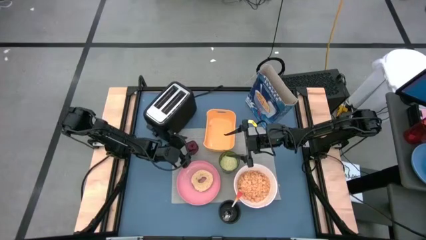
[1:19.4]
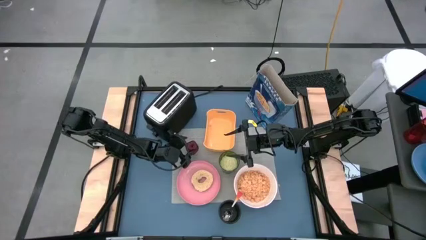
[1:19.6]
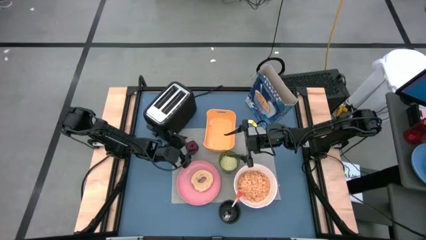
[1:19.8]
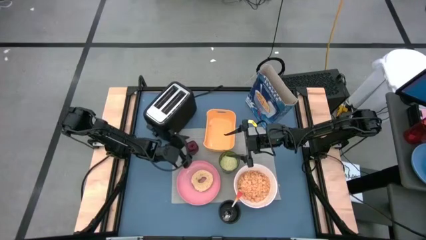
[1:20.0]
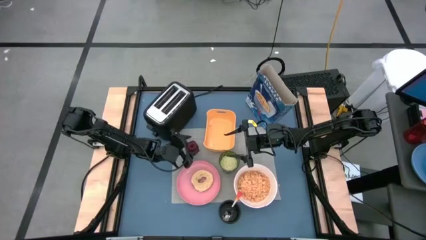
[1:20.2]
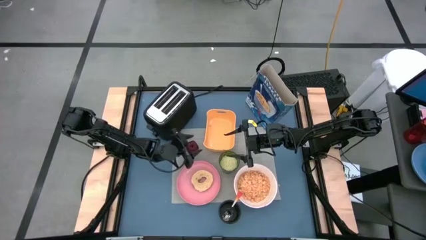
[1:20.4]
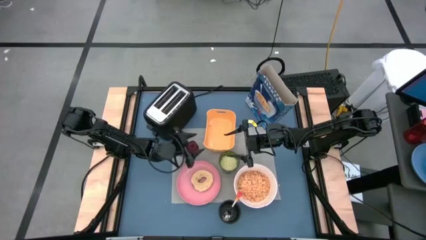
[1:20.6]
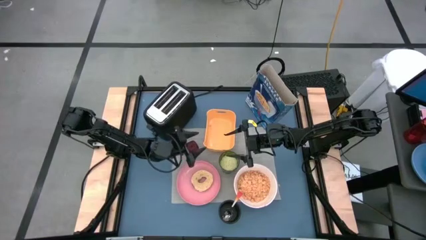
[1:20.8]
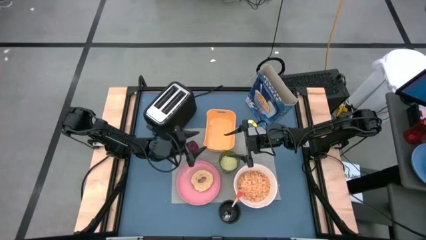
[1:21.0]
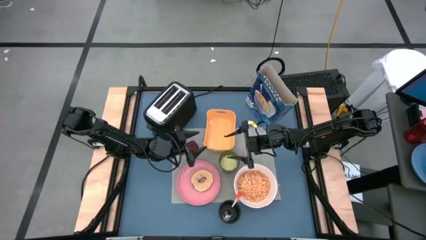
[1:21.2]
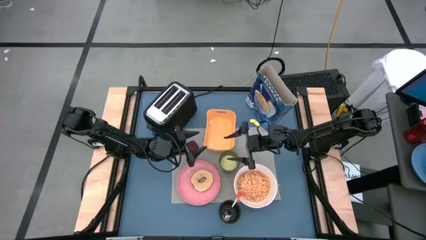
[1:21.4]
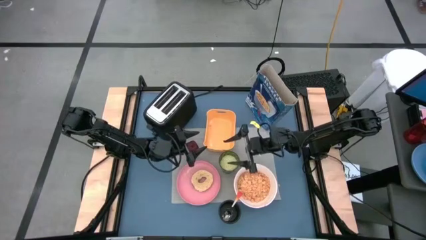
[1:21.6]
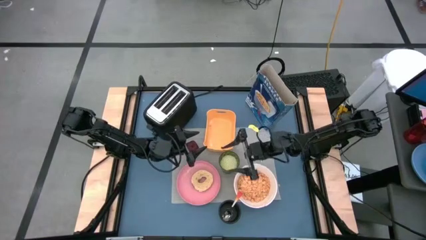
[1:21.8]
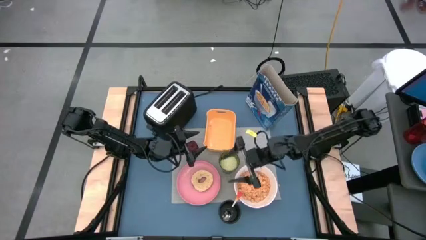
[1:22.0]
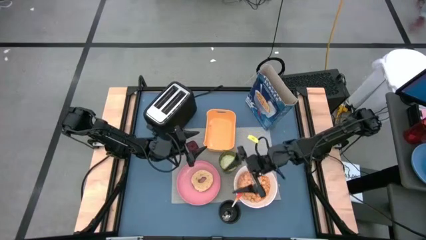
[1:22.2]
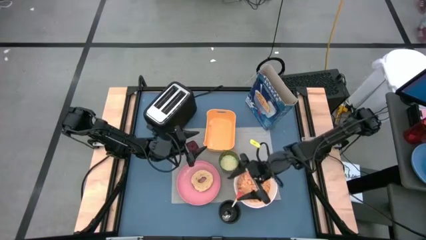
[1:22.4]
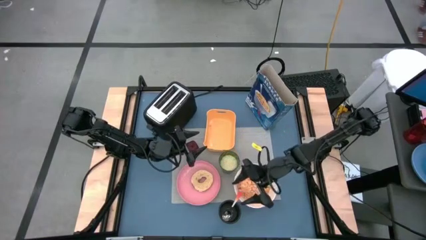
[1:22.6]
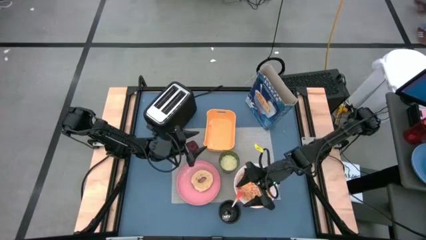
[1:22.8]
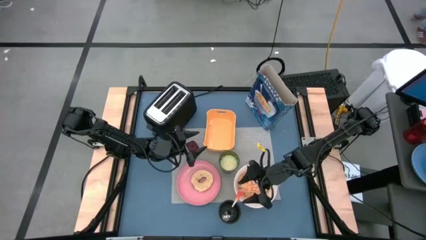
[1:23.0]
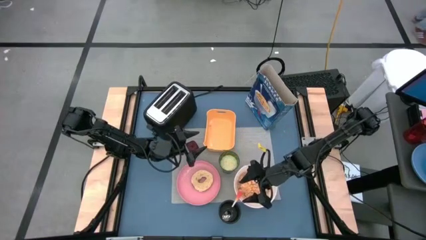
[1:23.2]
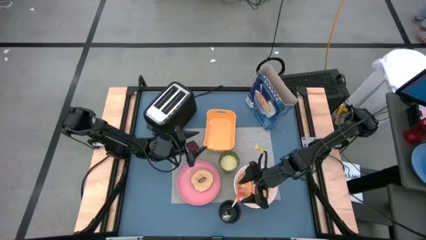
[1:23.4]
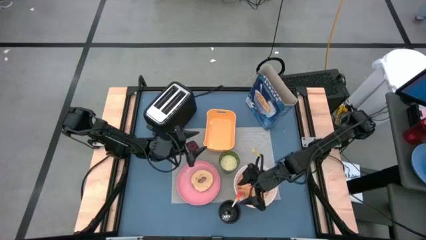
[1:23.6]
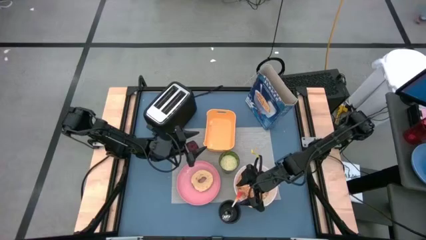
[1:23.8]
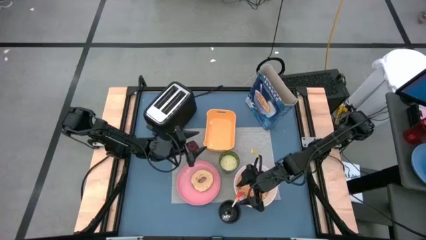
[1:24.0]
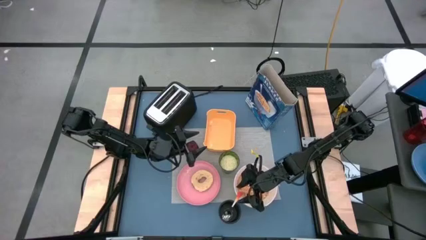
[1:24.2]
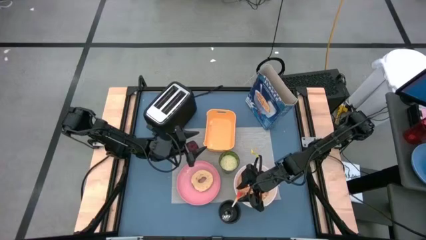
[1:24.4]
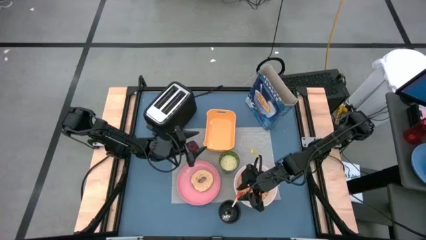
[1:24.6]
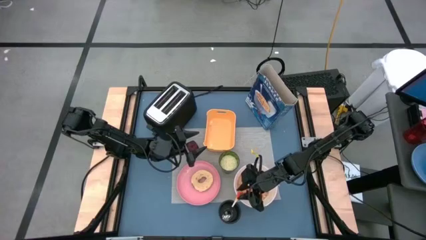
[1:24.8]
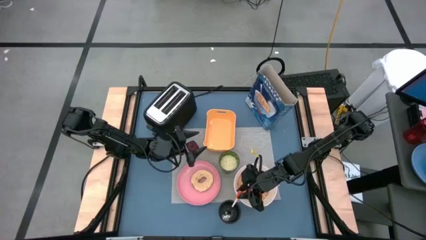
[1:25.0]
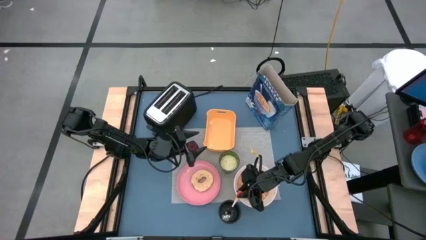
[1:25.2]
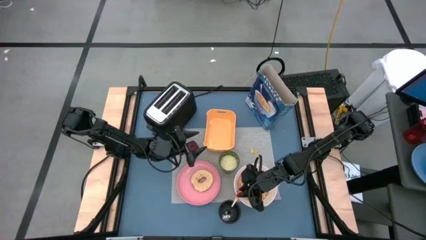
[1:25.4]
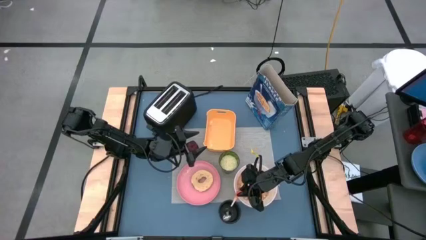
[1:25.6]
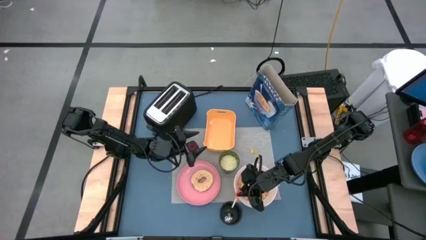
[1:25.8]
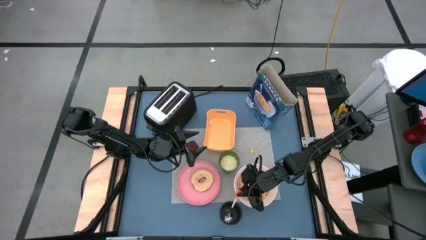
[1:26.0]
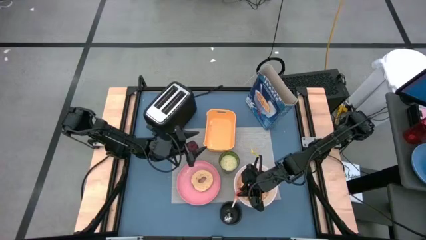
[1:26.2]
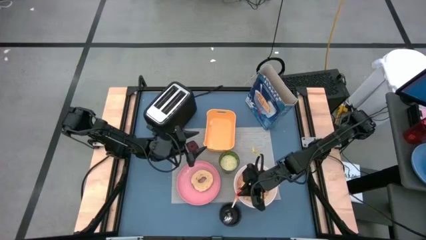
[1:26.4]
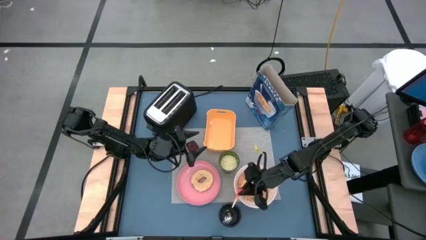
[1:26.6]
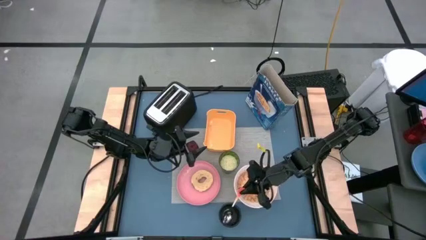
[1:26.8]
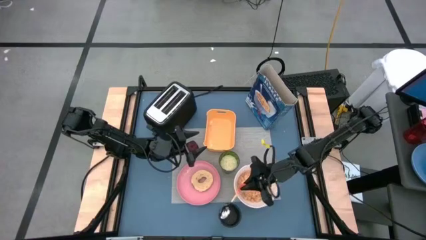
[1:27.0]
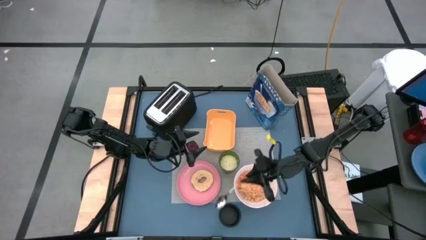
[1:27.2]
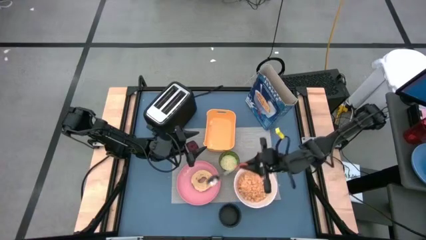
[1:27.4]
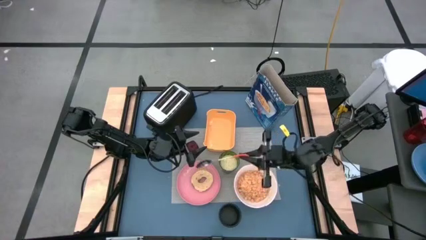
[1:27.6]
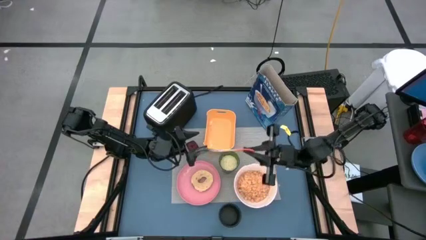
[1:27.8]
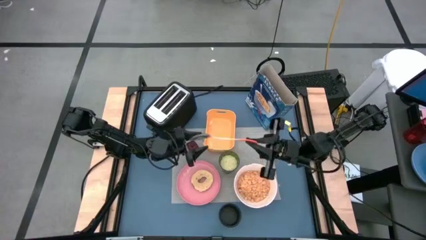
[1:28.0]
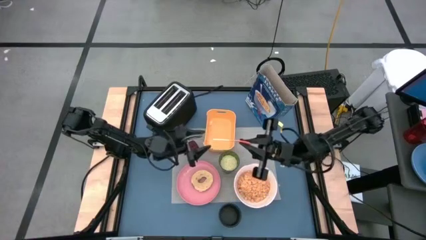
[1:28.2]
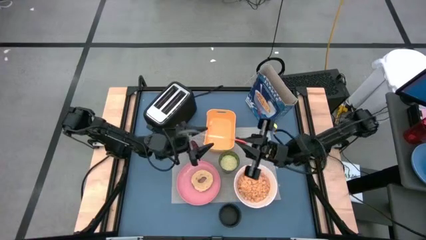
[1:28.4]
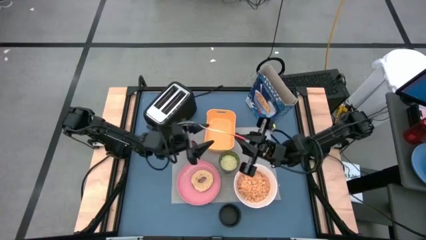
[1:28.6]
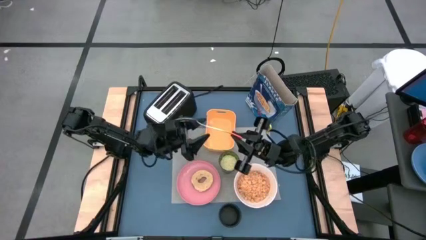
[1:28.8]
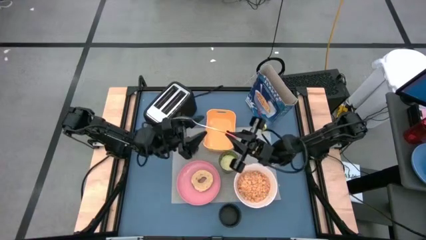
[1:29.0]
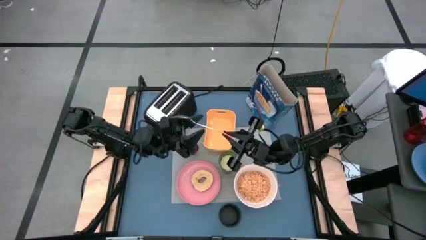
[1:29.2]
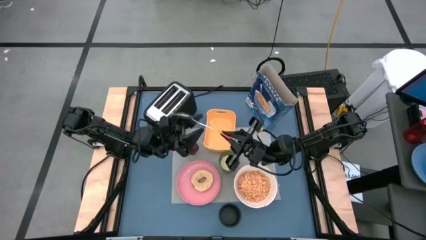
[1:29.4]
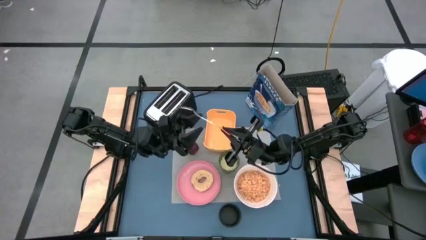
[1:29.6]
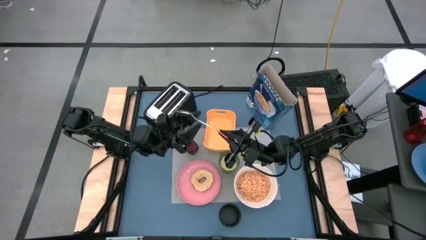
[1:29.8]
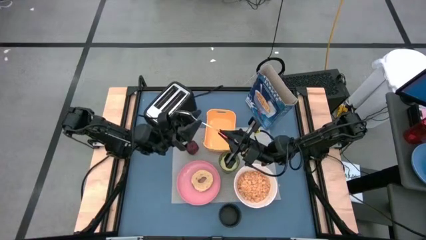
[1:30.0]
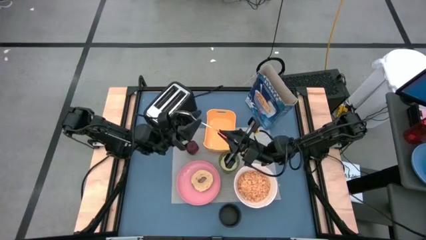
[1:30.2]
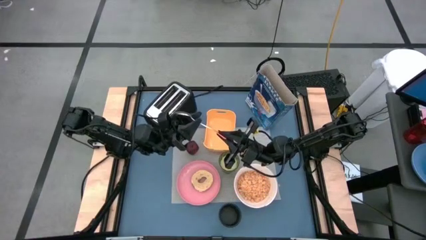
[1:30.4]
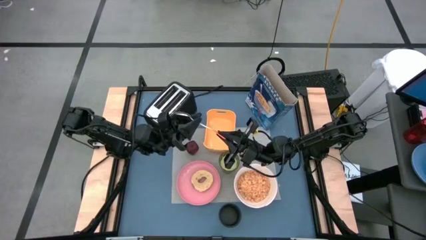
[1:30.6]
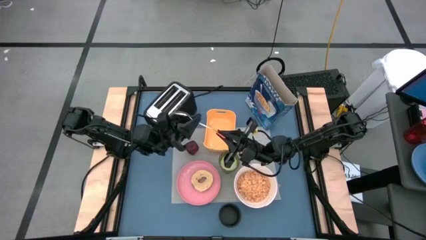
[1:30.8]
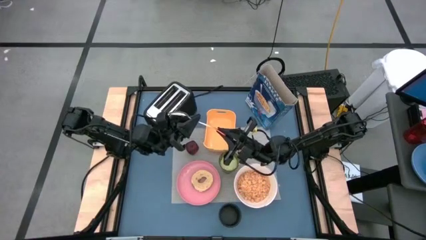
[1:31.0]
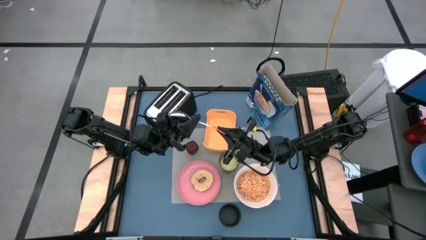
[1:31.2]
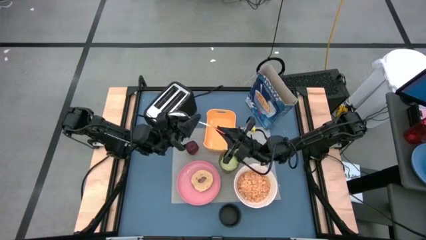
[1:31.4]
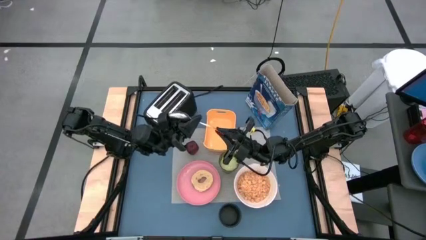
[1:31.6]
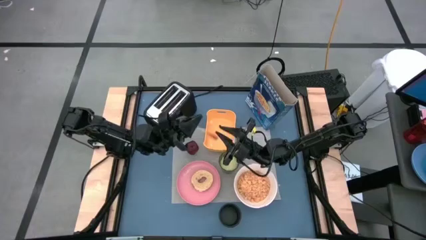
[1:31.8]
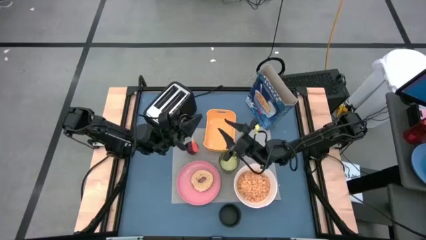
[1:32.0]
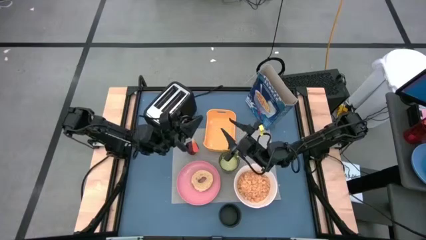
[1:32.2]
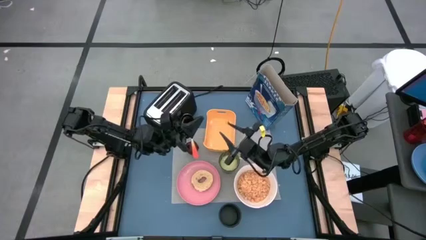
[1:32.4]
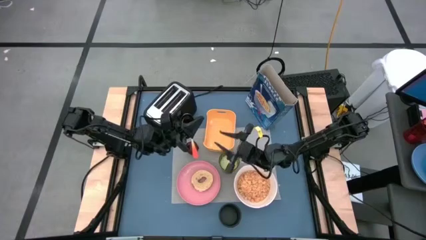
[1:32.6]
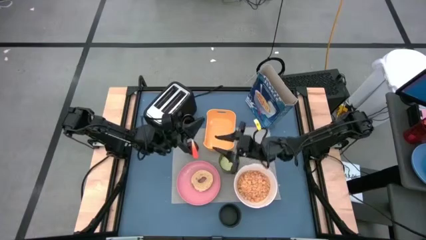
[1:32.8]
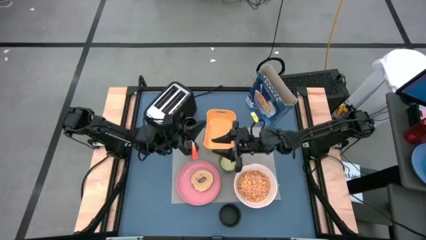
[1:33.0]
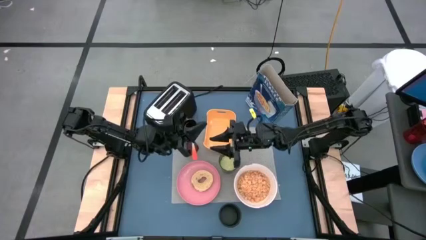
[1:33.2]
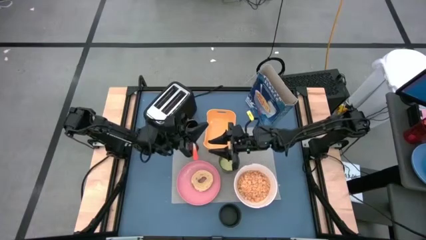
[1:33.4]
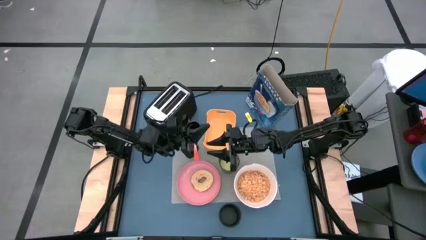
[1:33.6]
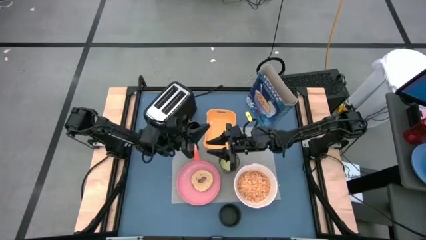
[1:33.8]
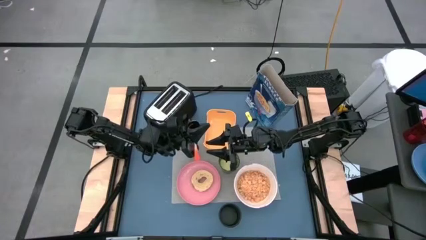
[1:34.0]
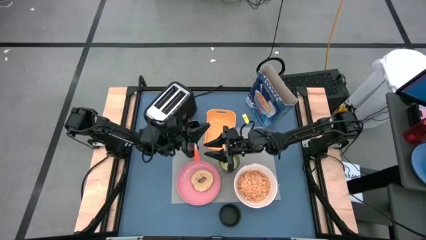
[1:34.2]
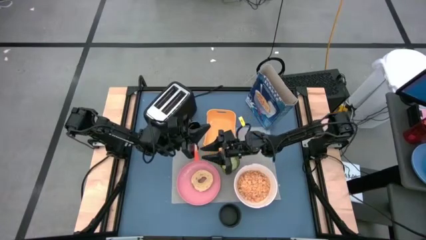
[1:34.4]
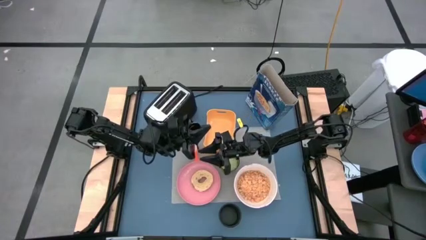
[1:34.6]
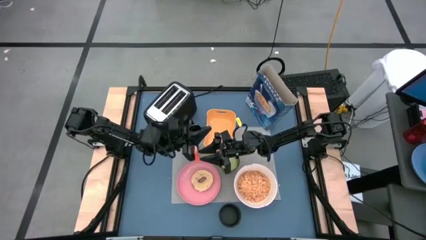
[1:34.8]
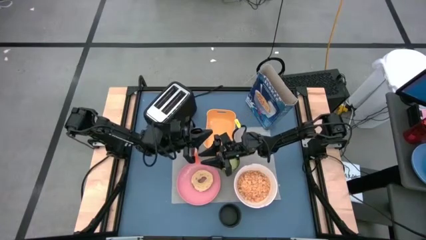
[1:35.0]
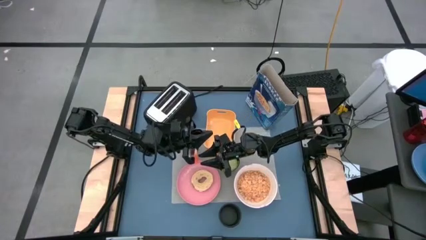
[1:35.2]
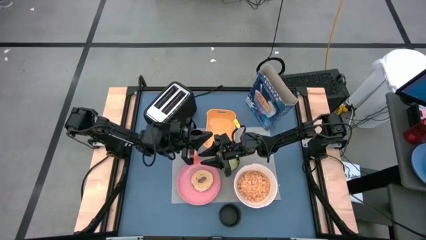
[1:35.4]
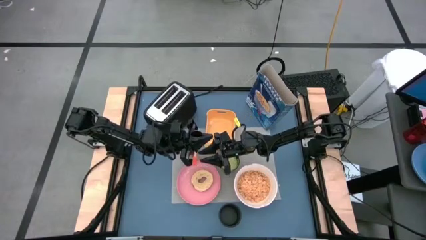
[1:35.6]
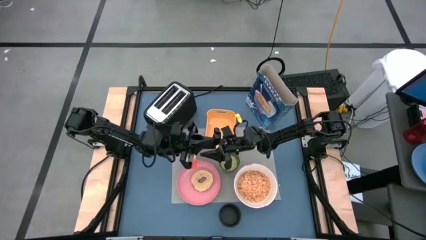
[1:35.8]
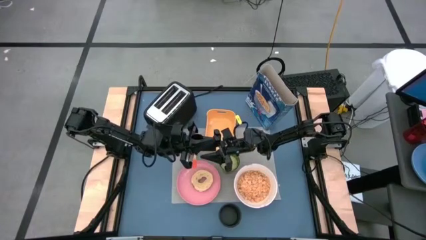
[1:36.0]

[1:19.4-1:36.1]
Task: Arrange a breakfast setting
Put the orange spoon on the right side of the gray table mat
